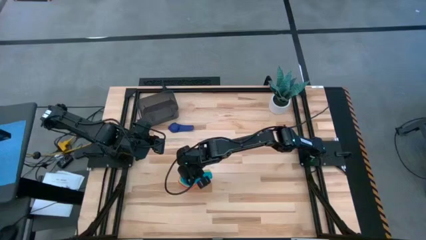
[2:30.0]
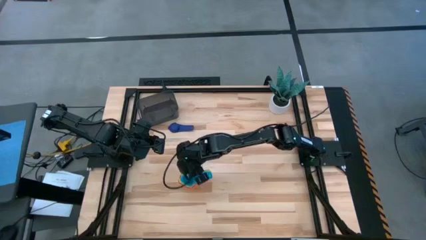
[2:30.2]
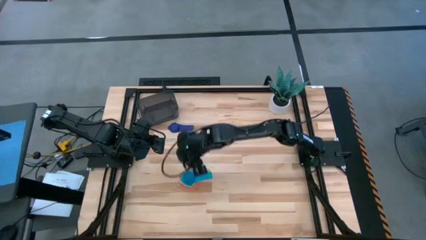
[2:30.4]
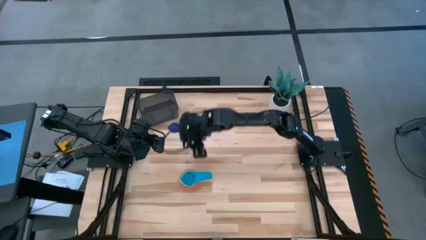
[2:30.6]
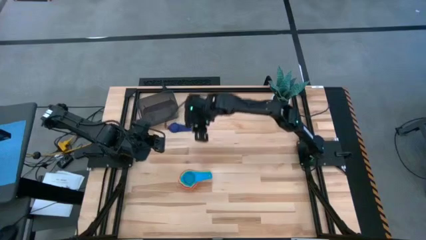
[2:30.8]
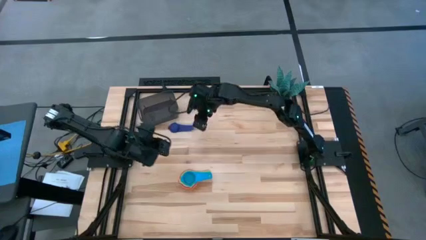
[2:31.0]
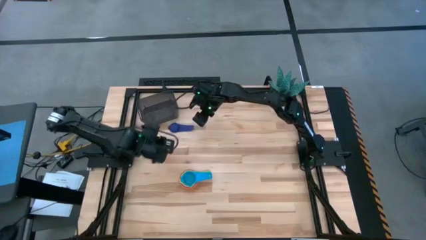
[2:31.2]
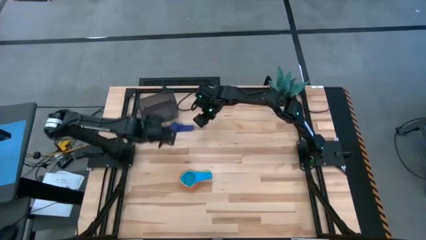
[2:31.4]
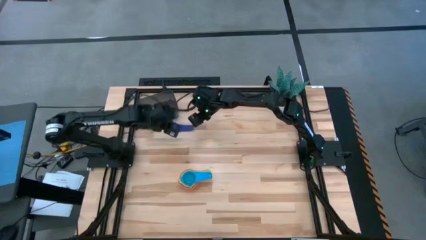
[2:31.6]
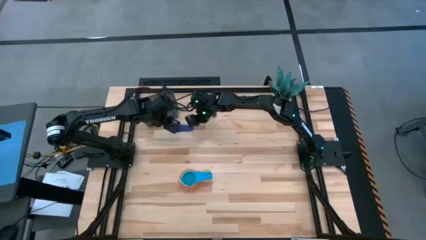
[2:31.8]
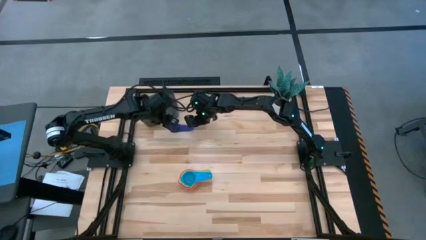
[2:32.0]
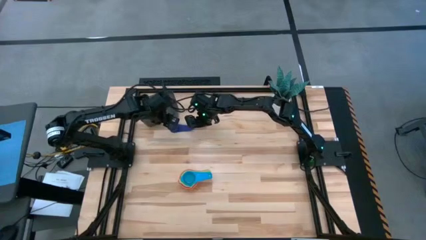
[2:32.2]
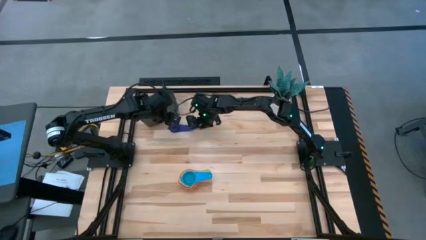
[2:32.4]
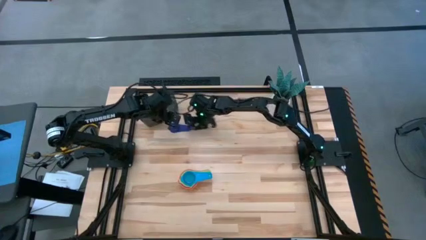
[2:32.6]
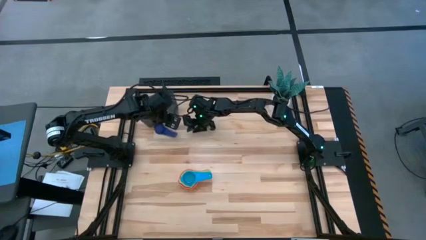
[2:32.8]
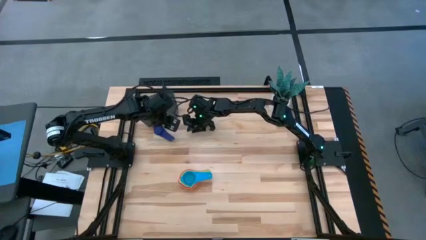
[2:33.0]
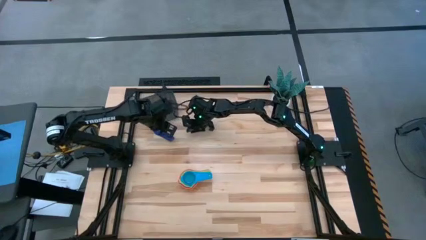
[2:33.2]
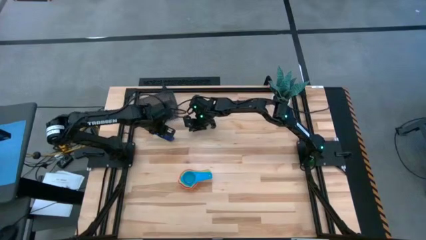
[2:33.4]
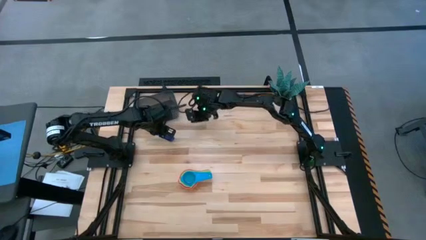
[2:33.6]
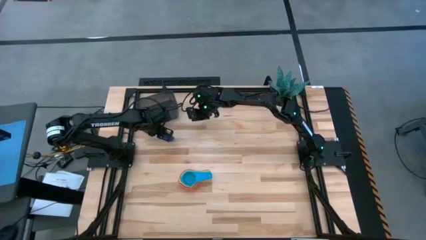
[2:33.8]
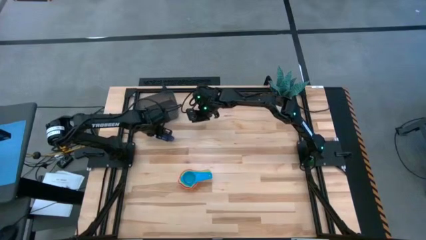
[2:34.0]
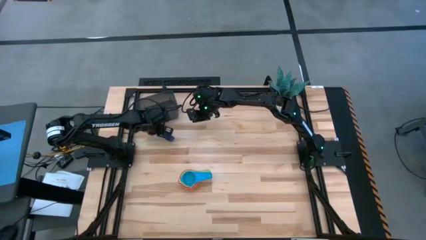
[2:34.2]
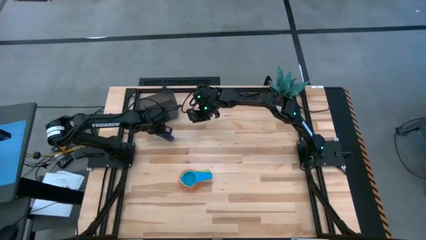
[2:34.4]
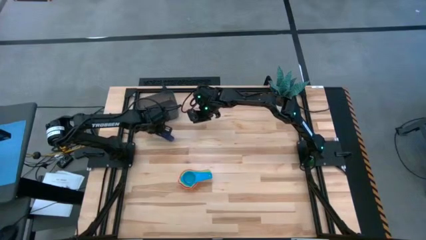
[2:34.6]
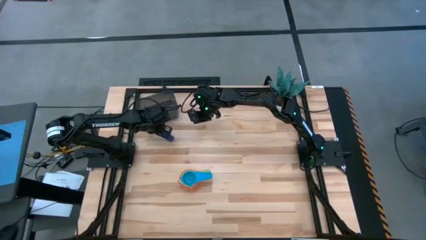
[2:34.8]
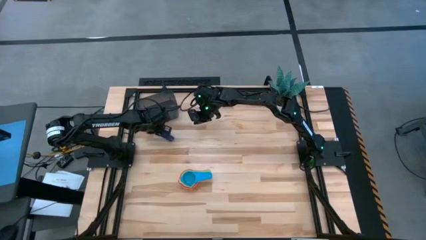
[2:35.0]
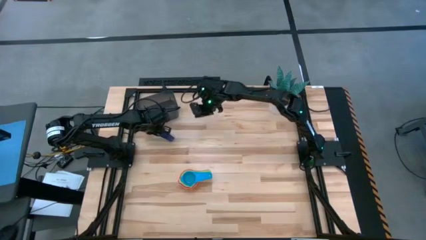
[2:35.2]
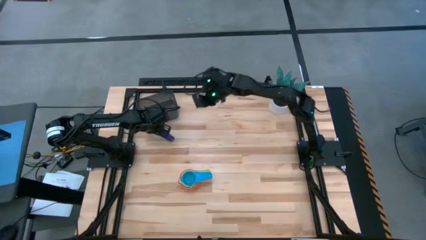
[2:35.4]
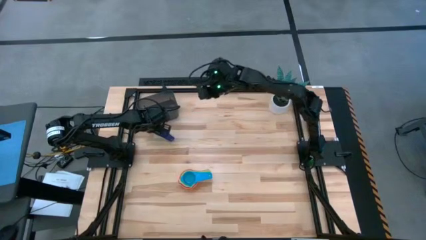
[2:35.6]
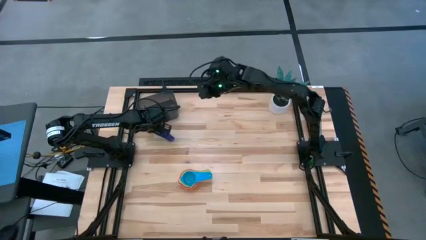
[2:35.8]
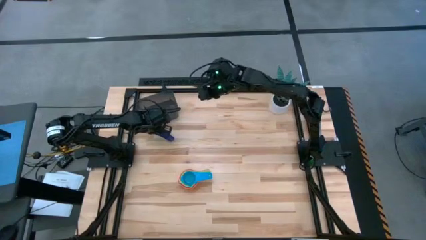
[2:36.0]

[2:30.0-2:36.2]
Task: Nest measuring cups in basket
Stack the dark blue measuring cup on top of the light blue measuring cup

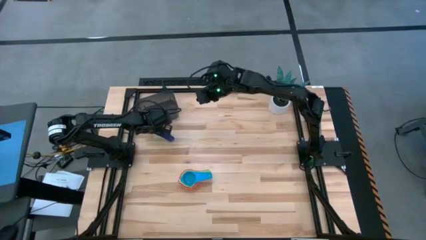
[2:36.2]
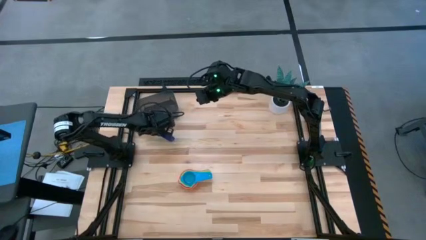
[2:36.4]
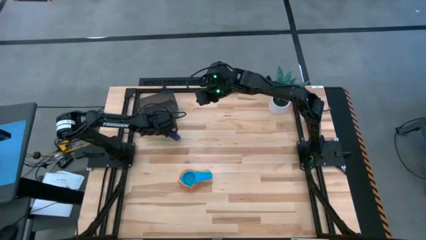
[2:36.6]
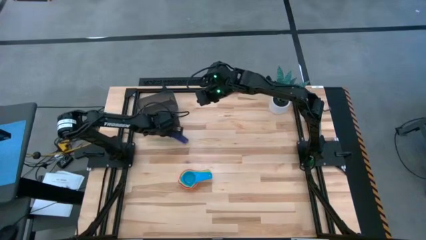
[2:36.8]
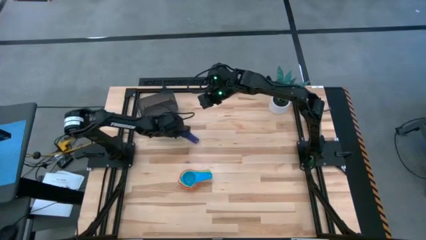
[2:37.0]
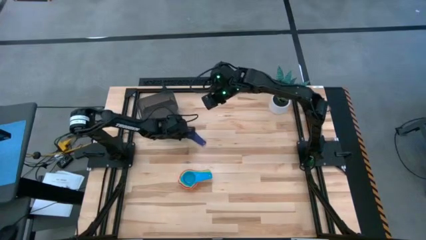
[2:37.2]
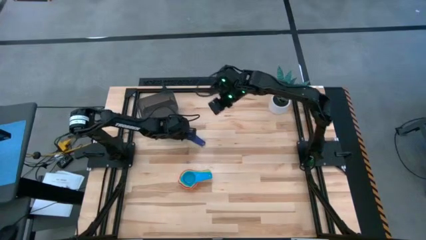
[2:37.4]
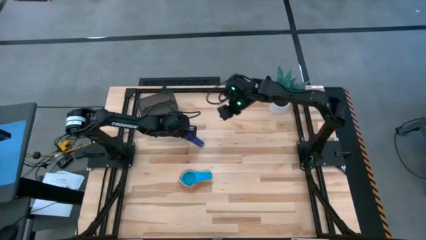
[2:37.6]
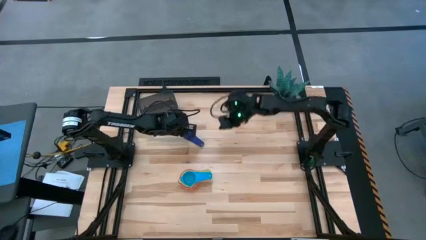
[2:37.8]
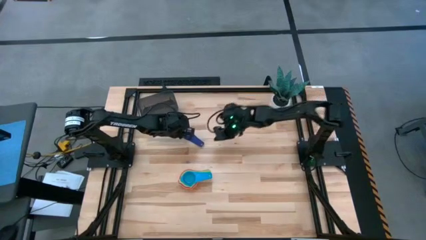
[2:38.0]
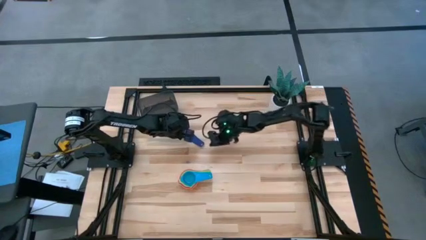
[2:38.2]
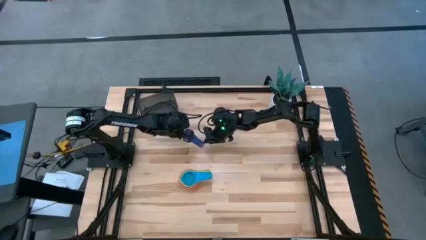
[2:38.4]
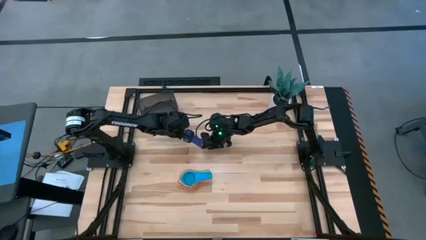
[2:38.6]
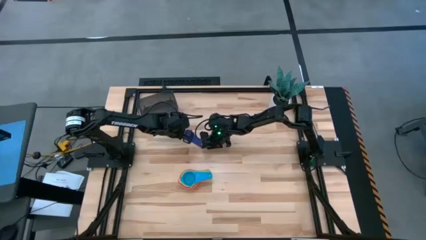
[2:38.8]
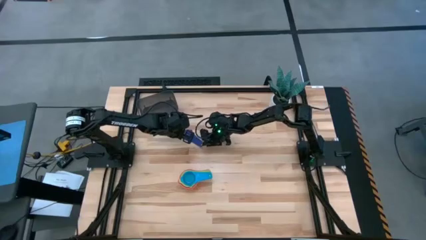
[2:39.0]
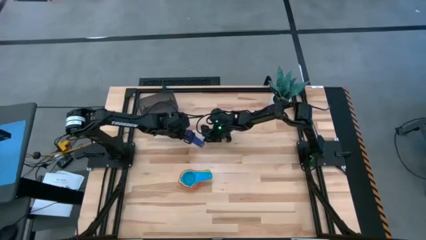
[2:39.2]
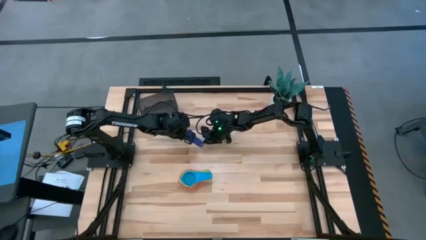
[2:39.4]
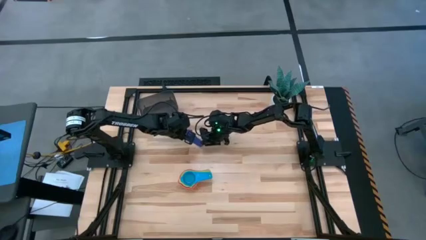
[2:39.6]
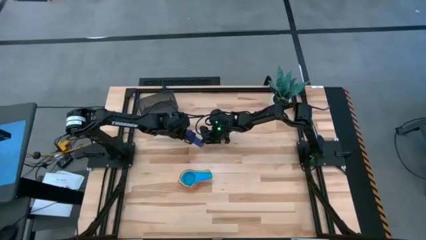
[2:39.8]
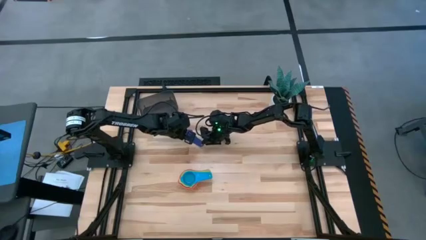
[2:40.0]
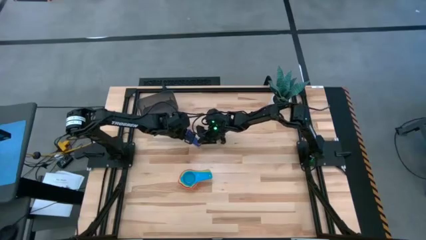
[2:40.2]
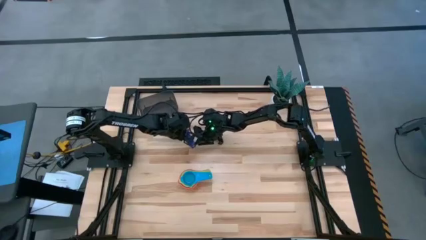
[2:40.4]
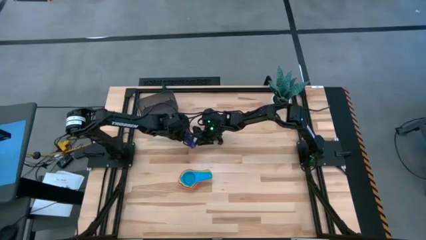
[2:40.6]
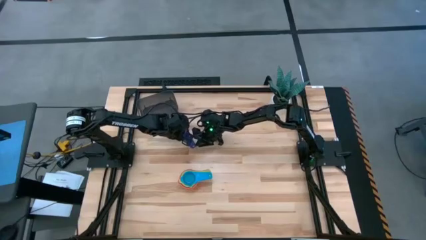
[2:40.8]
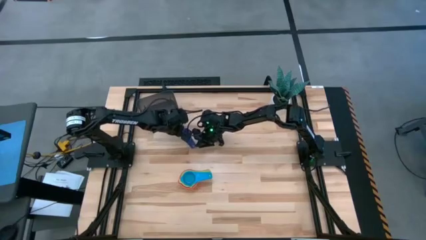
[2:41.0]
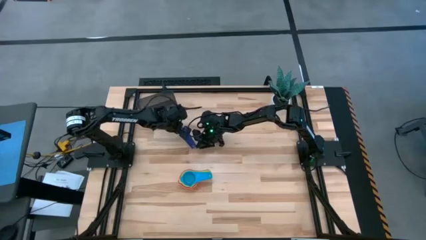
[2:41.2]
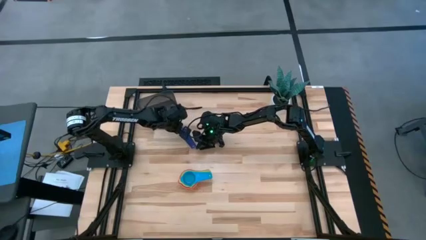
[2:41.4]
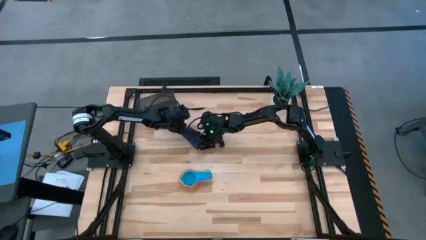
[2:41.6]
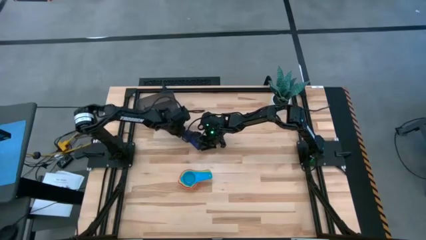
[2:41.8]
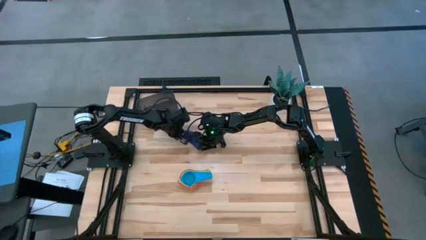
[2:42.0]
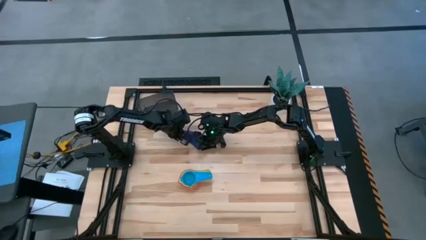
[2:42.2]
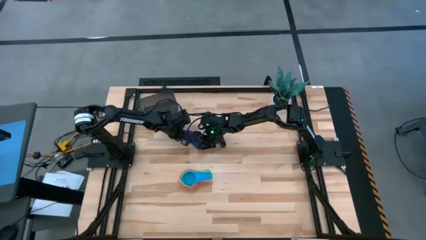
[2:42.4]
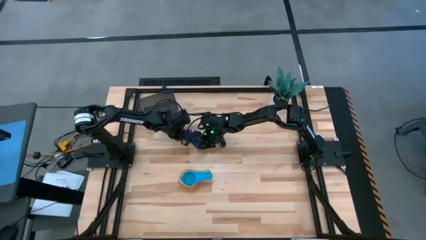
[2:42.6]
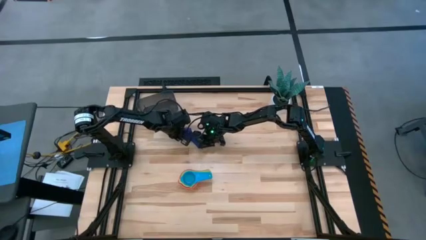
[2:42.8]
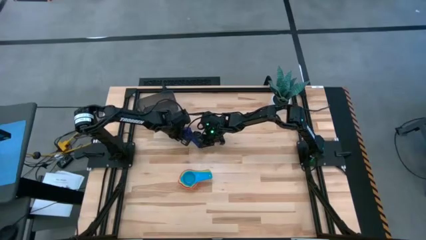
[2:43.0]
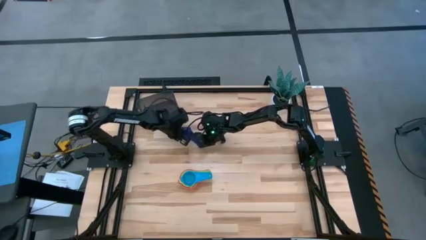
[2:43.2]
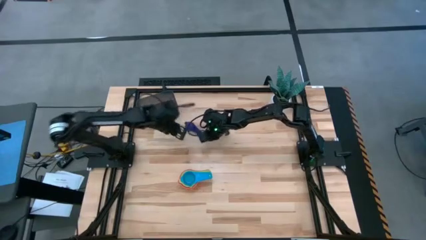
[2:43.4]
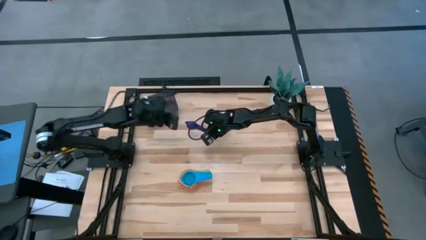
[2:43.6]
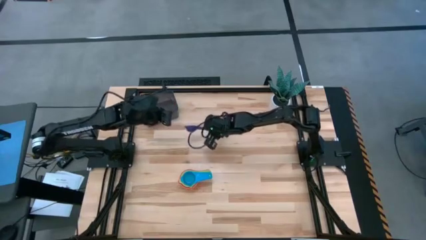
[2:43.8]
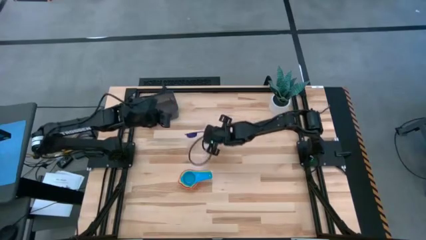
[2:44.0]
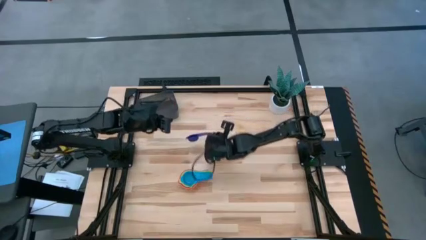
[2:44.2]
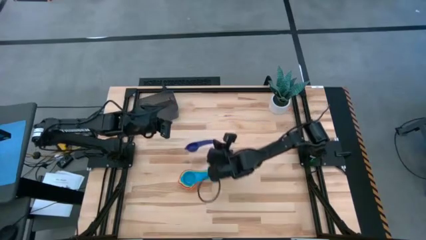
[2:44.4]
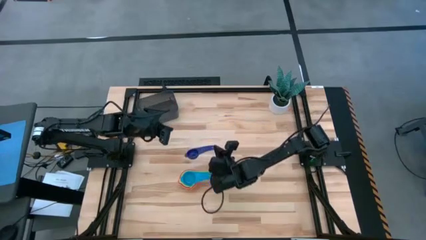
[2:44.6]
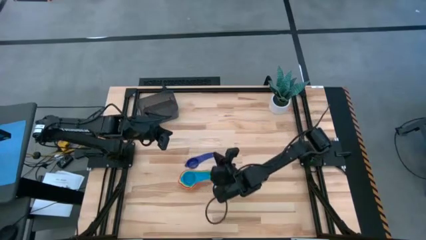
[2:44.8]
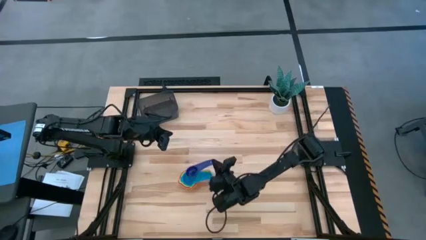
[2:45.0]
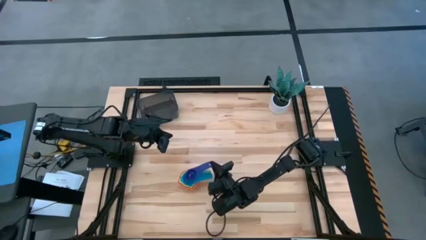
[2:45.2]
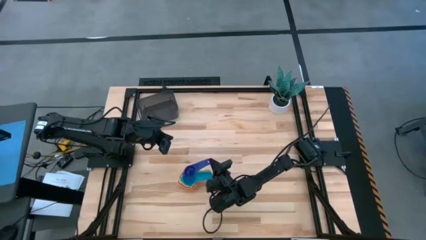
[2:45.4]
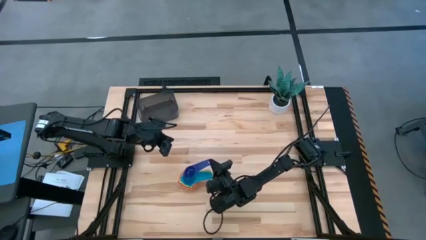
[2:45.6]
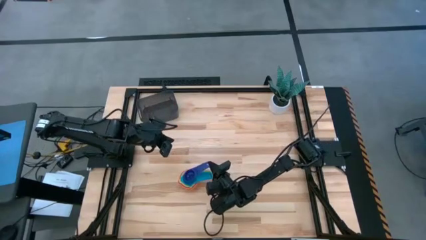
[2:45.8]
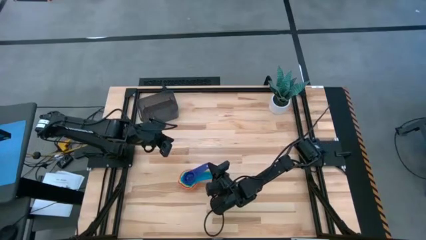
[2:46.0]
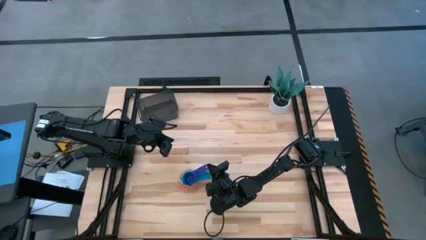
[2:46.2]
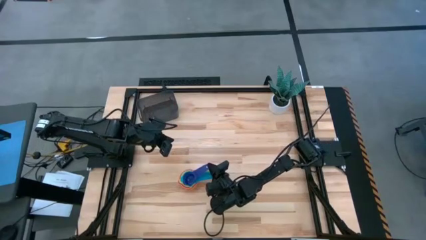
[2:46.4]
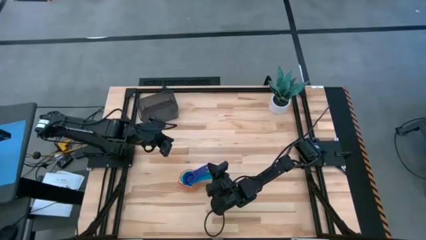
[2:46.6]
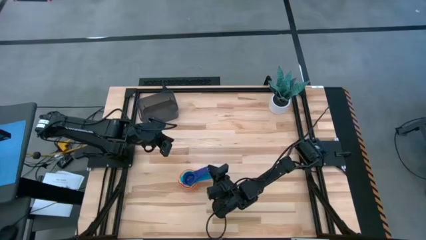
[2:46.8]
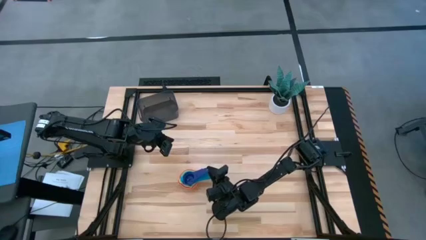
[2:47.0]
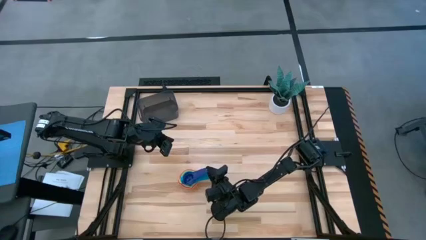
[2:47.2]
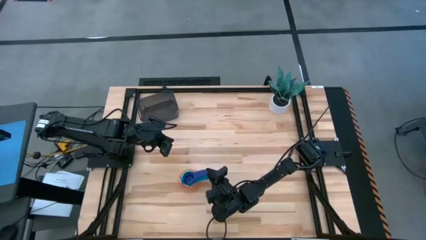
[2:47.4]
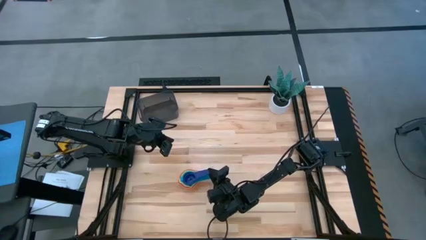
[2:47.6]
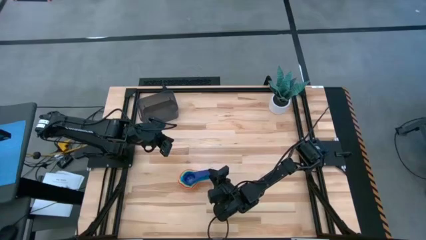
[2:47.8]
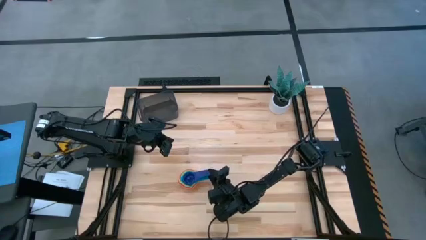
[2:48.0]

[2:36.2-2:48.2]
Stack the dark blue measuring cup on top of the light blue measuring cup
